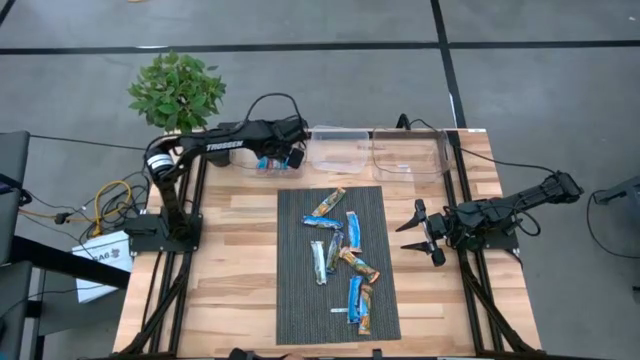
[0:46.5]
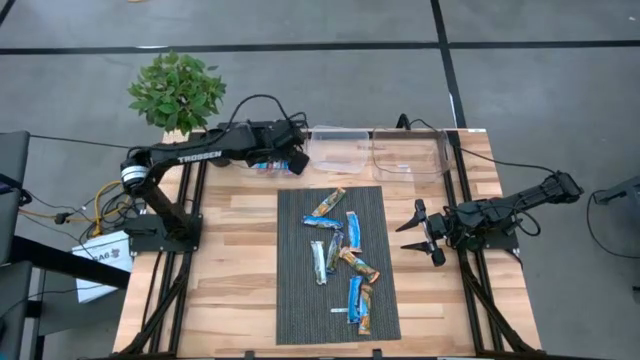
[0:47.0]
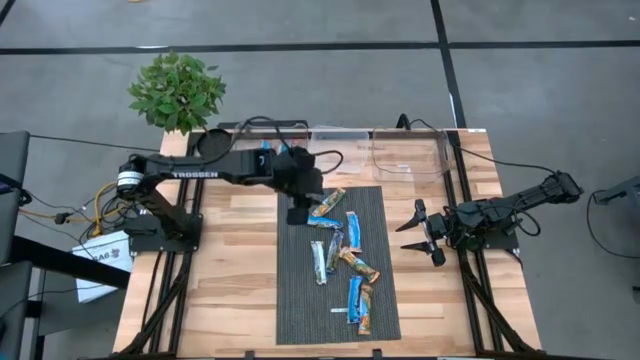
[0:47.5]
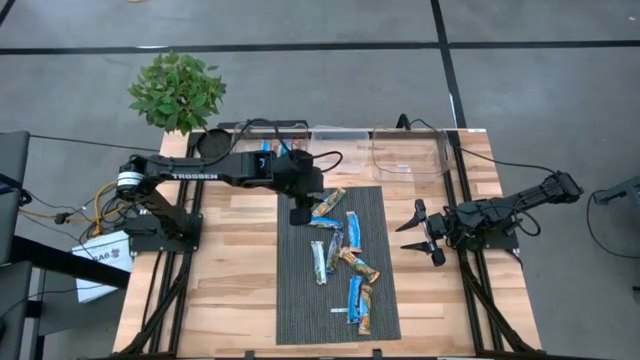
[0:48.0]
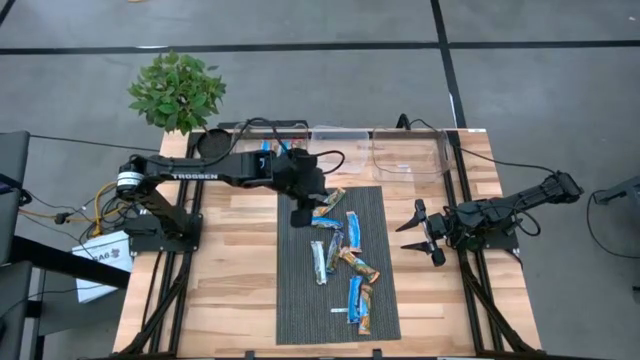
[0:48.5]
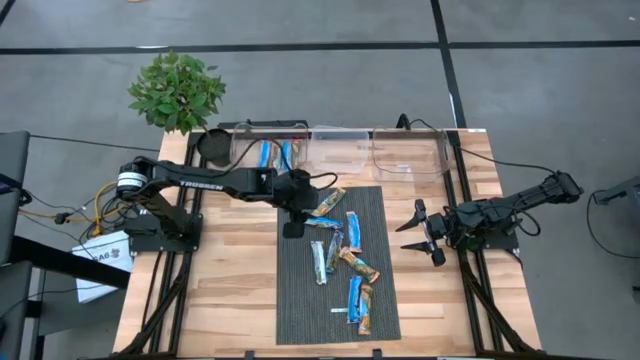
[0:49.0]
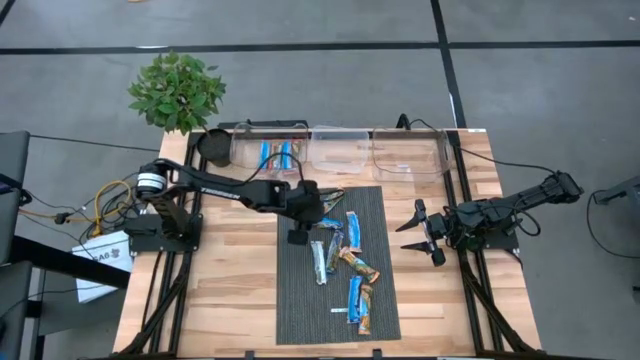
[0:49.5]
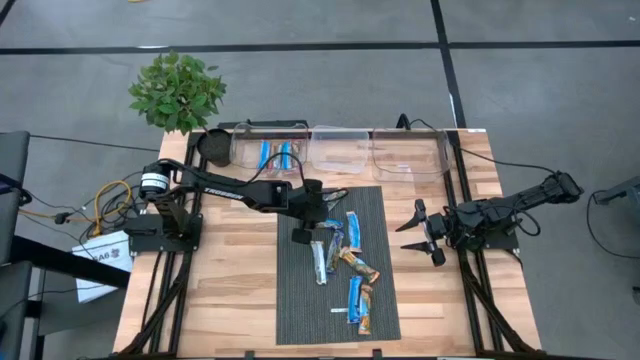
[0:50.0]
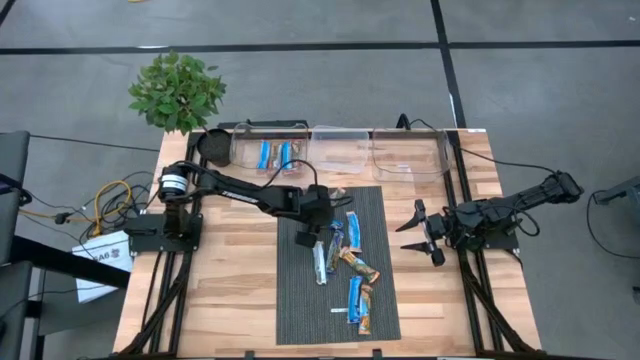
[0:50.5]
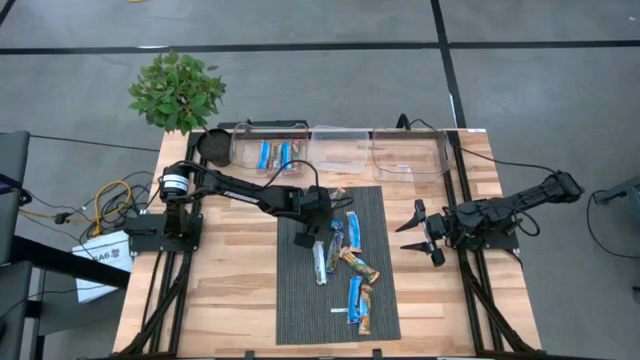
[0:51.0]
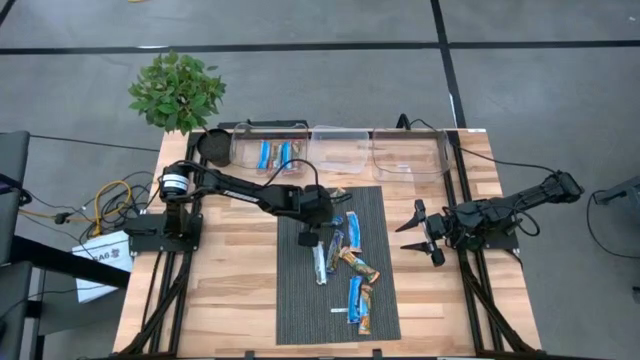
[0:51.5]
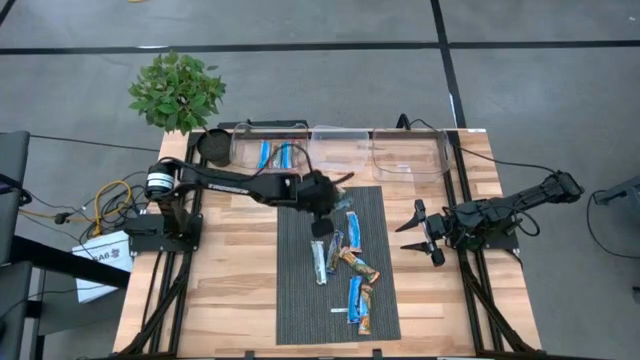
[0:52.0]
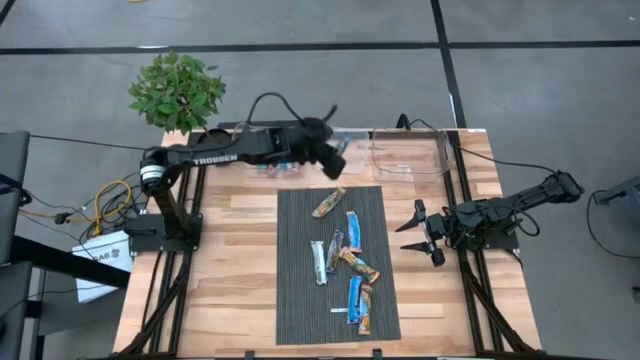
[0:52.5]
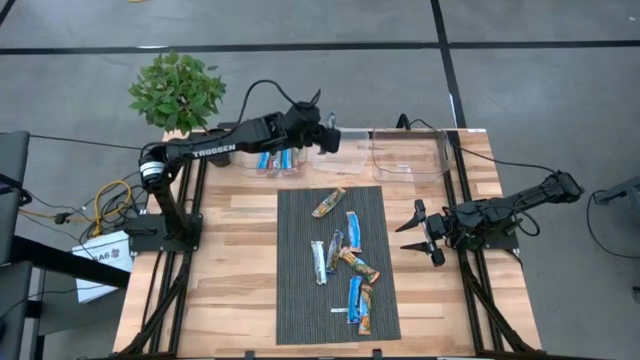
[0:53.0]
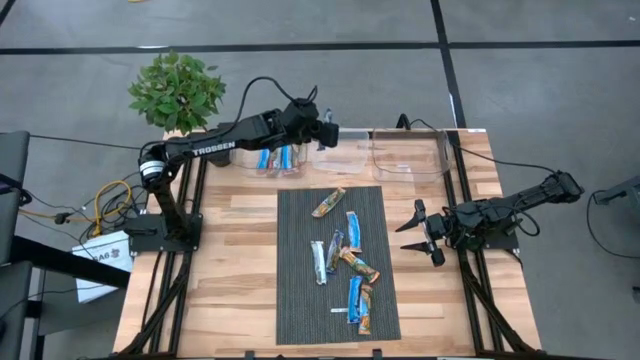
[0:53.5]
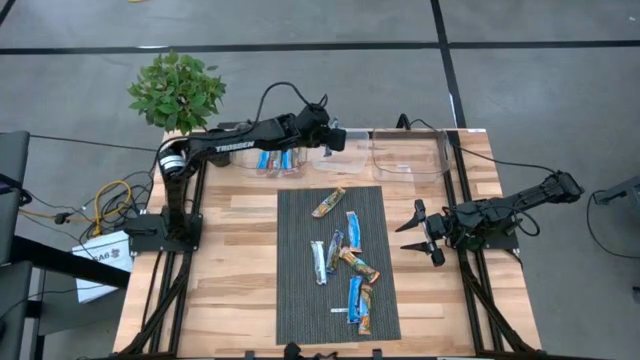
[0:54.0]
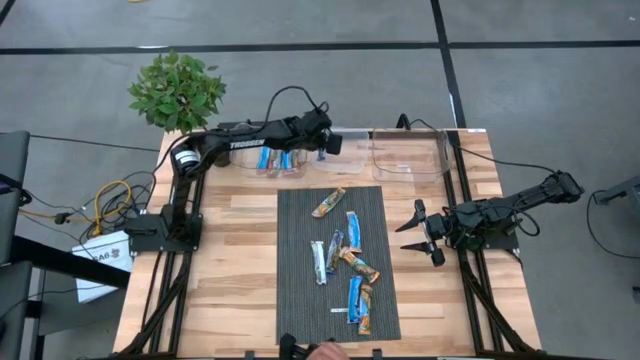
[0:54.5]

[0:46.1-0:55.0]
Task: Pick and place Granola Bars by type
Put the blue granola bar into the middle transparent bin

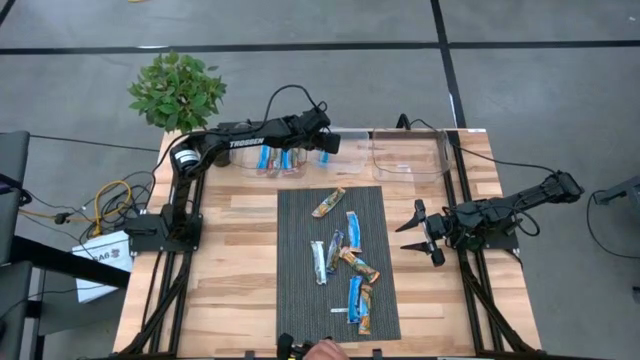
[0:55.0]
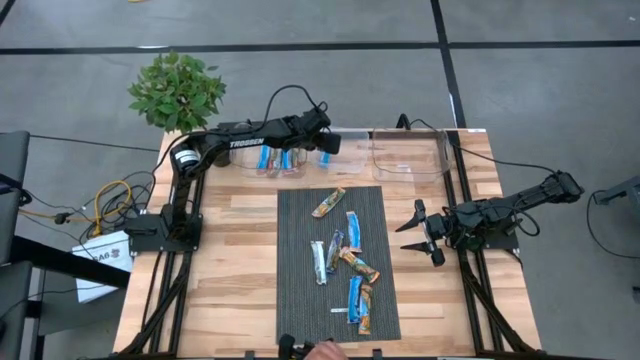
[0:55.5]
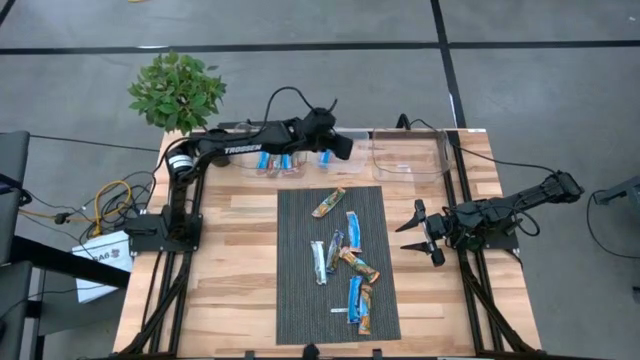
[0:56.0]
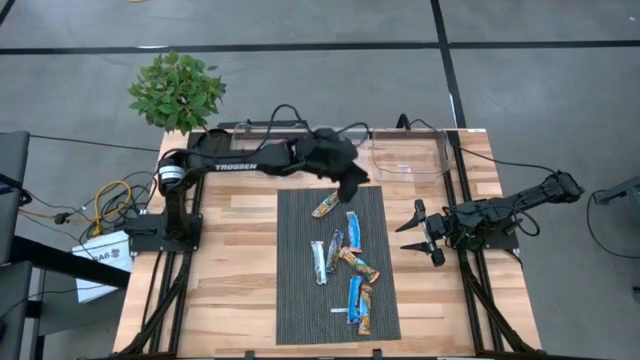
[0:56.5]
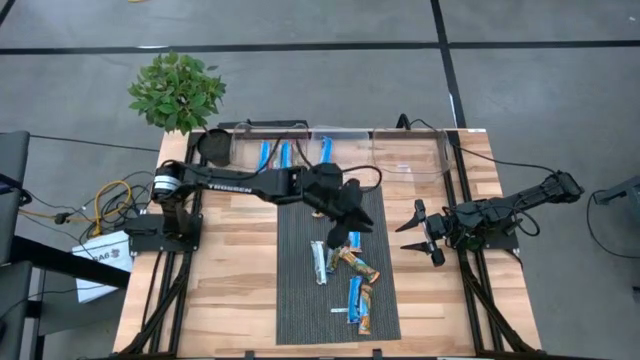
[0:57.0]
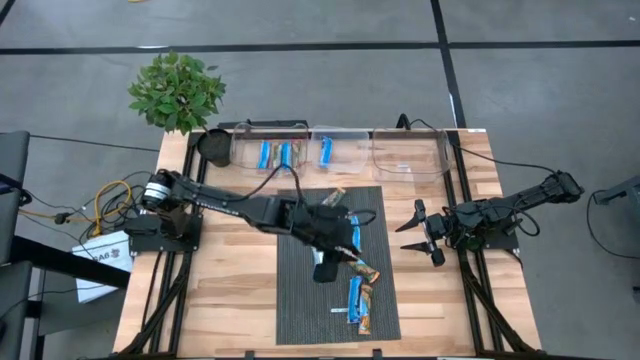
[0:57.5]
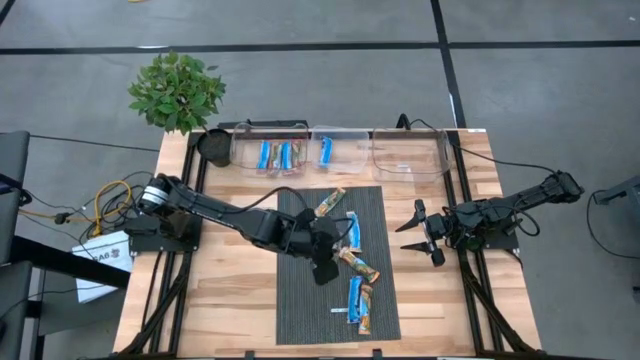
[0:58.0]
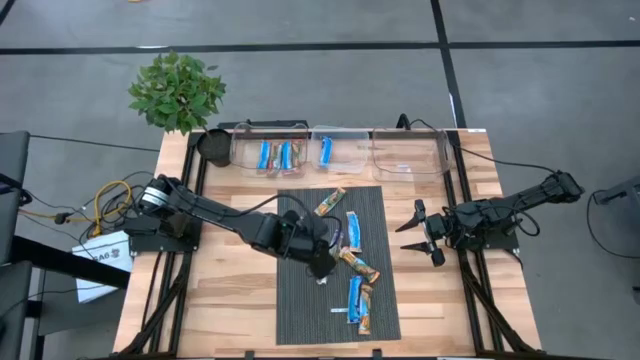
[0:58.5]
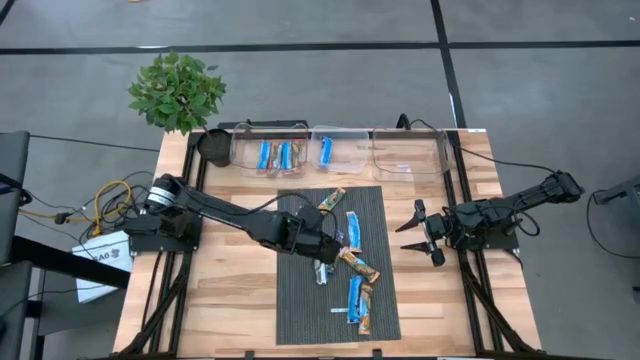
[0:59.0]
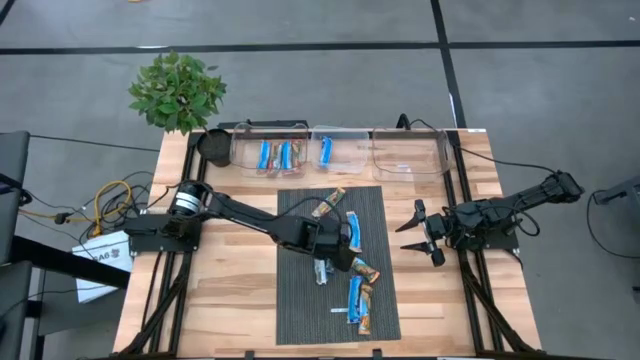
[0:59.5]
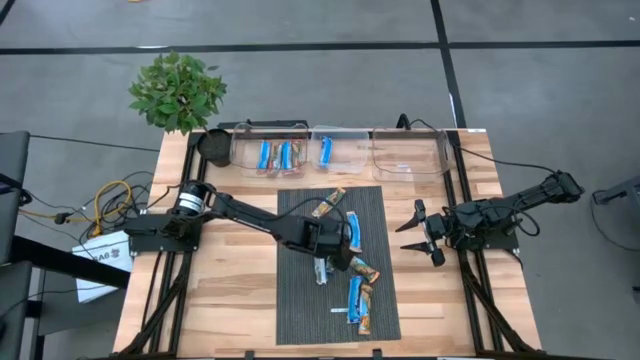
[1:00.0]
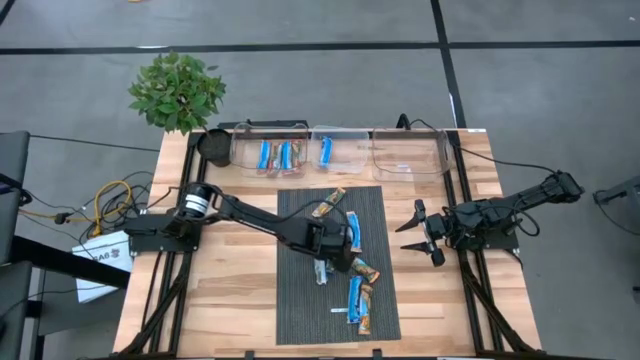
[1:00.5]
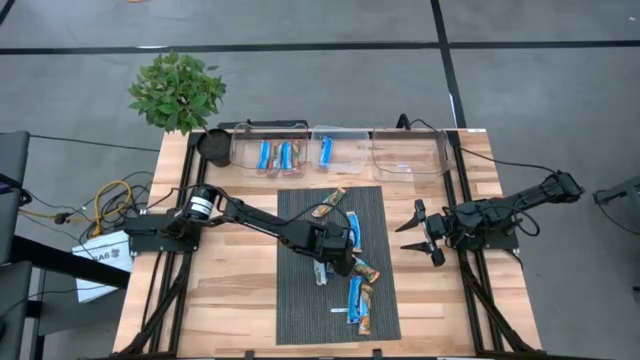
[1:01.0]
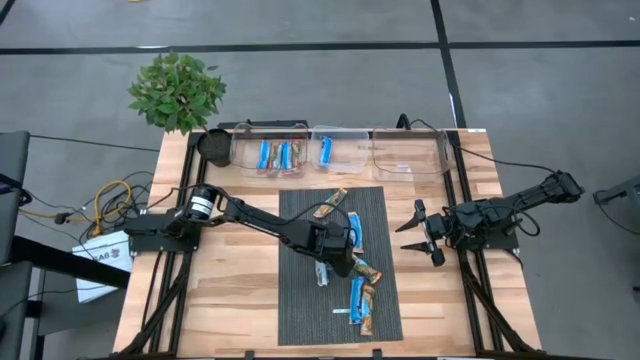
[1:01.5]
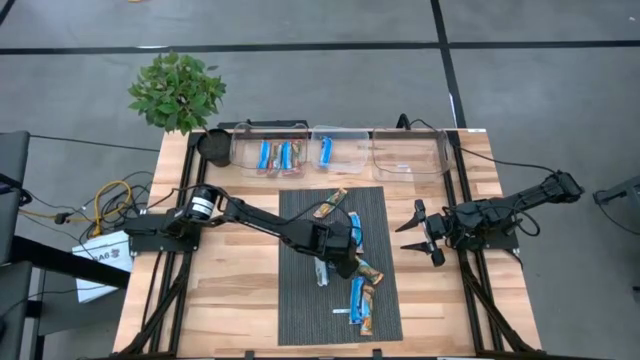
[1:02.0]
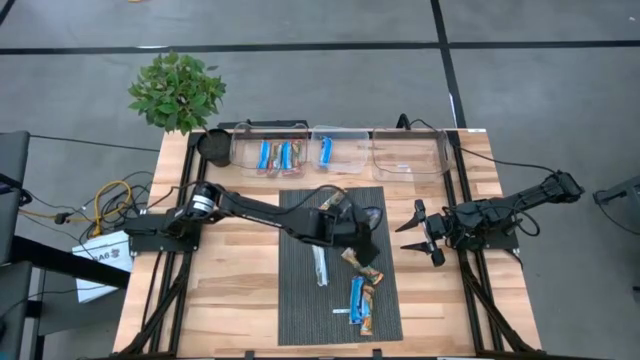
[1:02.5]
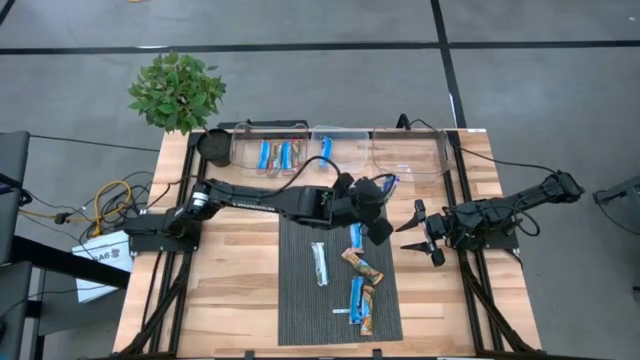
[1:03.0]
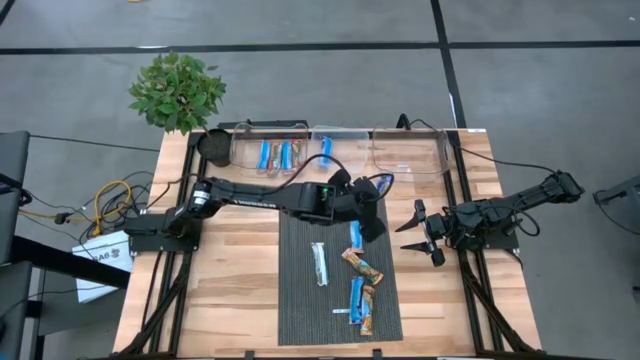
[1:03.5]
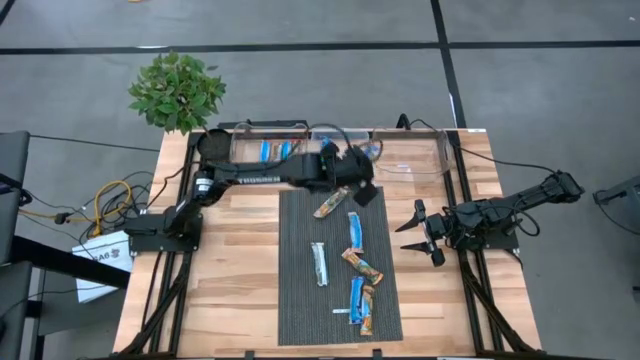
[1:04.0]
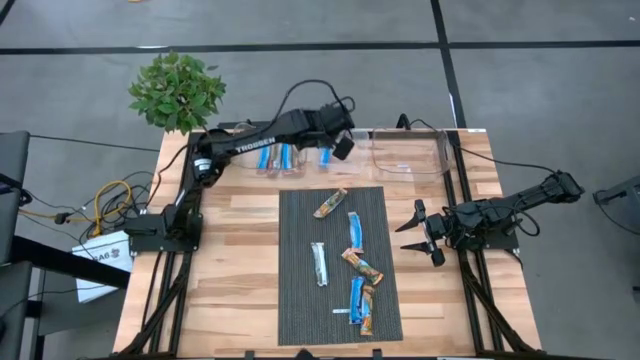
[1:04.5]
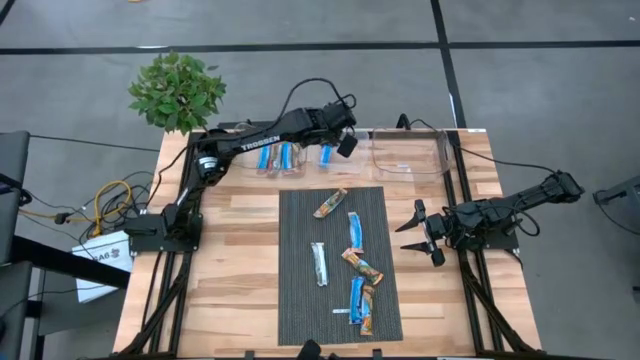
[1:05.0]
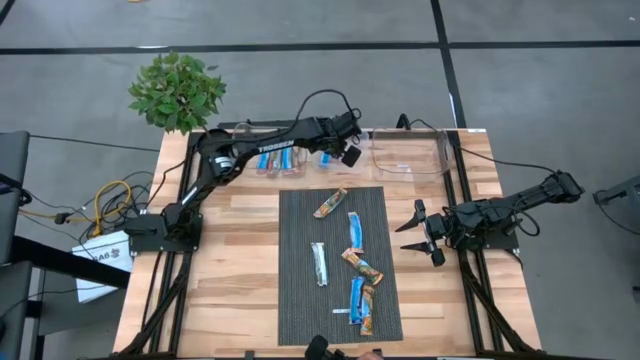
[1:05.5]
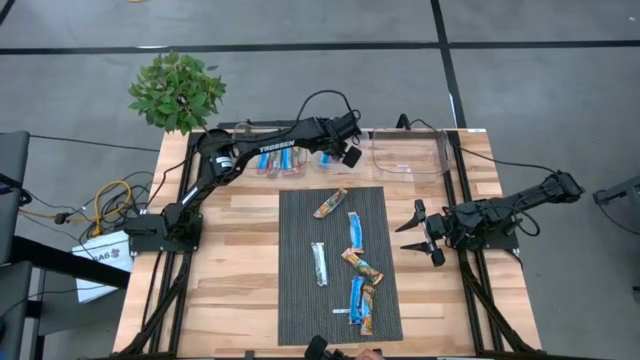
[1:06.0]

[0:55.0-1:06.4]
Put the blue granola bar into the middle transparent bin

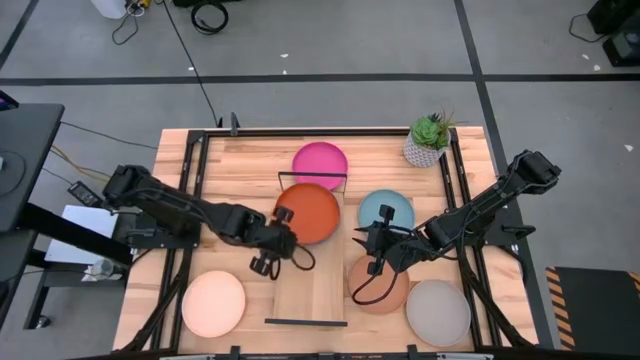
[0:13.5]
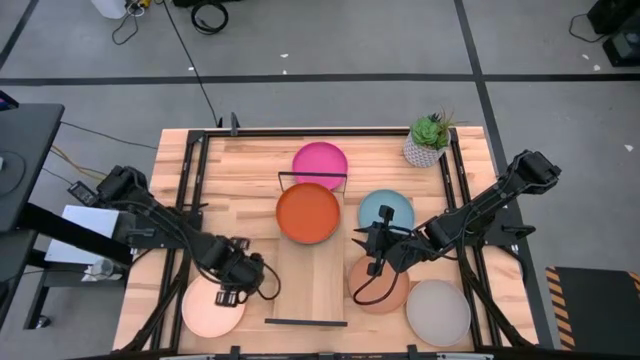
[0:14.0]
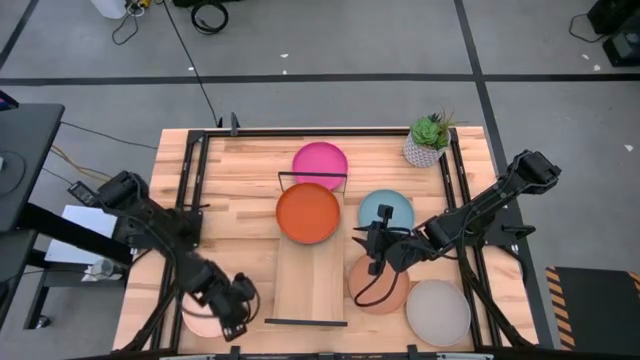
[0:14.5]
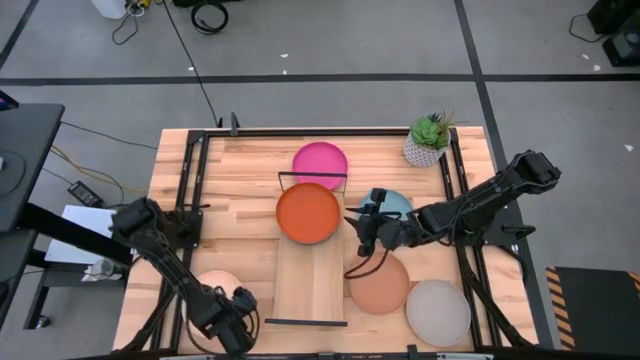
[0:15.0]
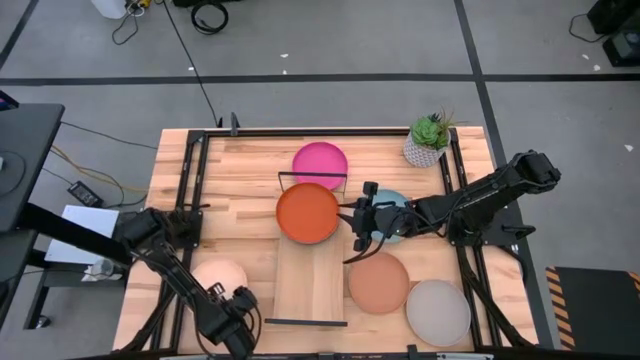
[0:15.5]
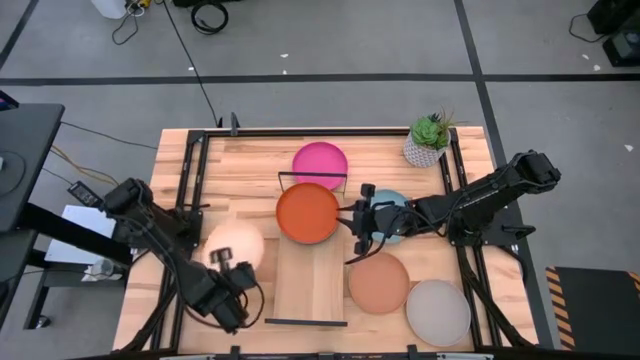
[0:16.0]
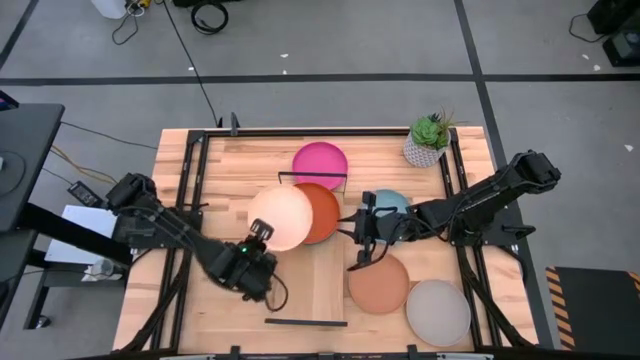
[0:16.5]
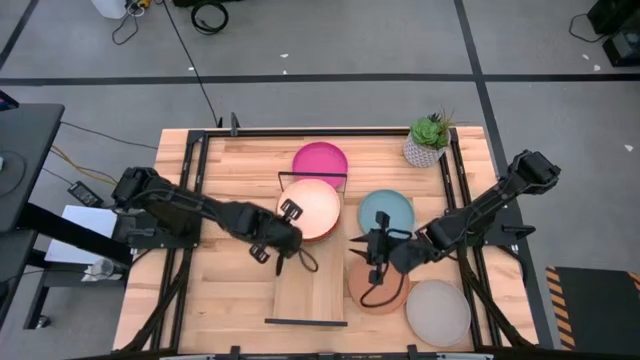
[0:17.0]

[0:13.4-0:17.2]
Task: Place and stack plates onto a shelf
Put the light brown plate on the shelf
